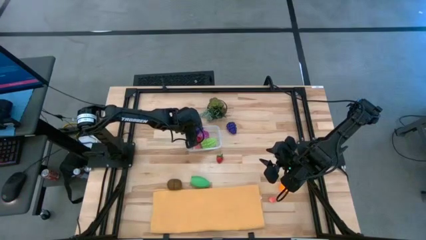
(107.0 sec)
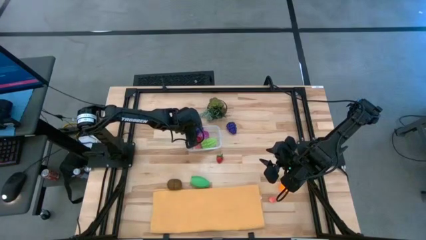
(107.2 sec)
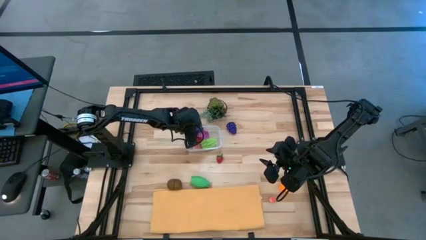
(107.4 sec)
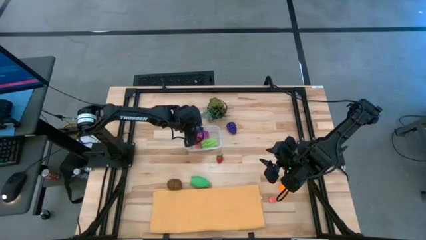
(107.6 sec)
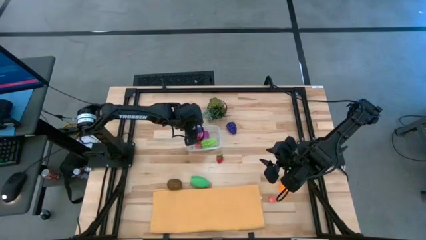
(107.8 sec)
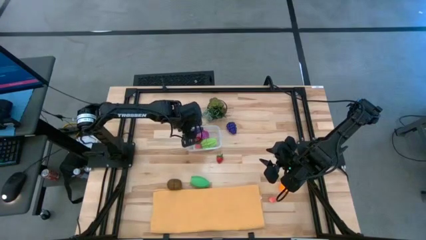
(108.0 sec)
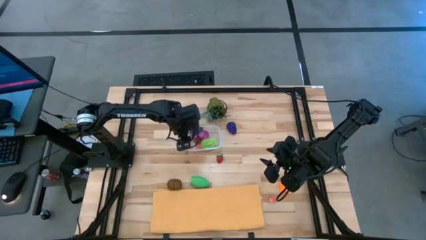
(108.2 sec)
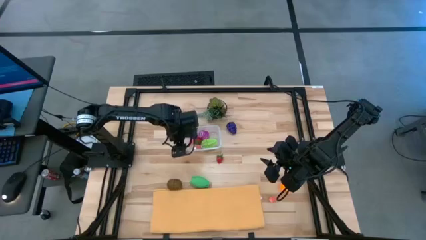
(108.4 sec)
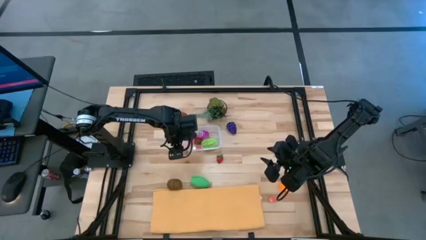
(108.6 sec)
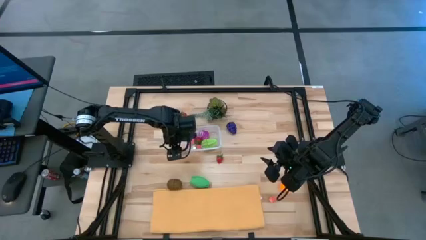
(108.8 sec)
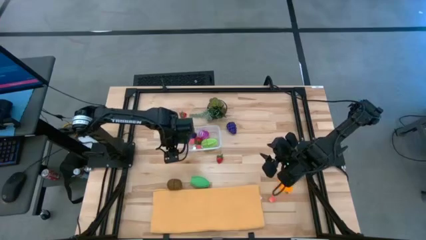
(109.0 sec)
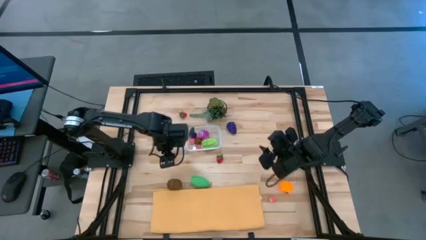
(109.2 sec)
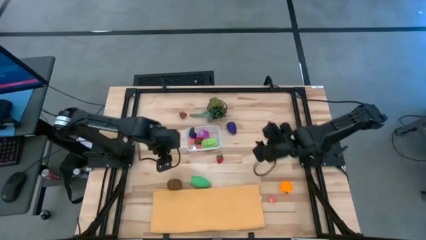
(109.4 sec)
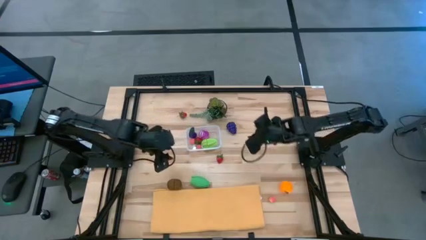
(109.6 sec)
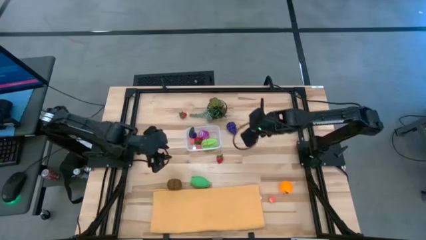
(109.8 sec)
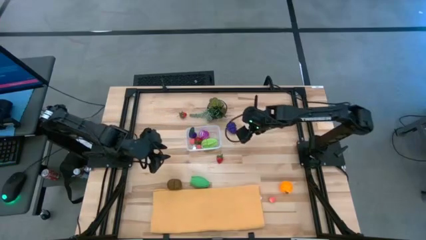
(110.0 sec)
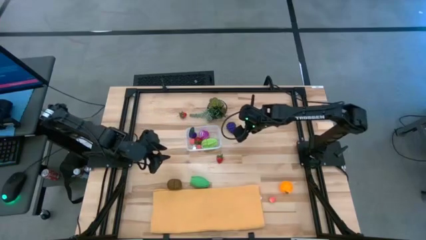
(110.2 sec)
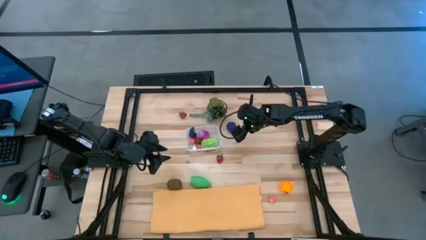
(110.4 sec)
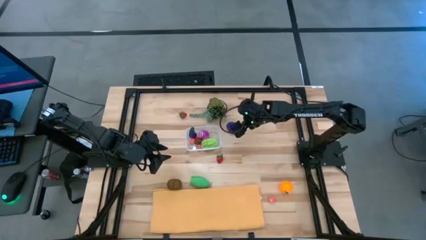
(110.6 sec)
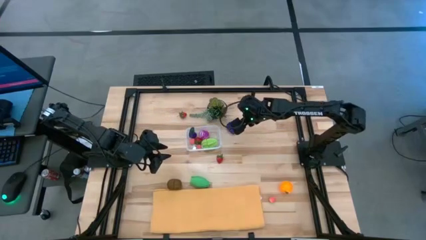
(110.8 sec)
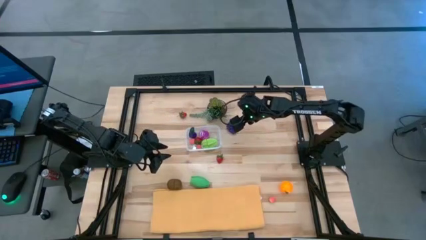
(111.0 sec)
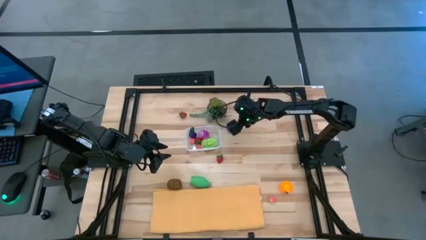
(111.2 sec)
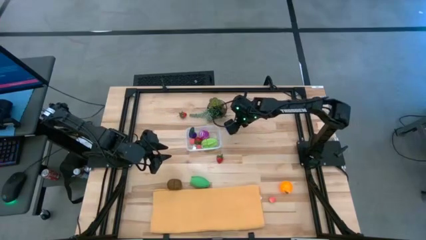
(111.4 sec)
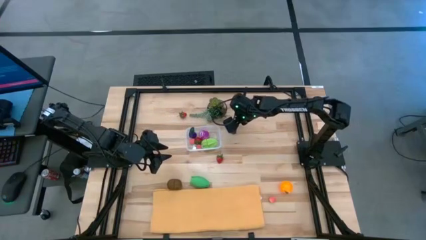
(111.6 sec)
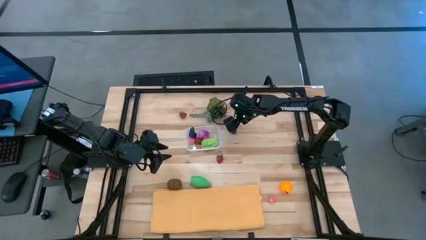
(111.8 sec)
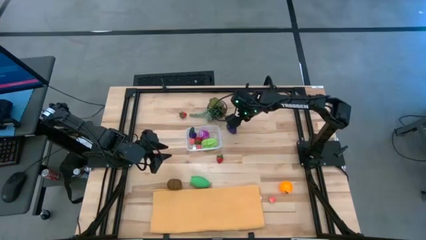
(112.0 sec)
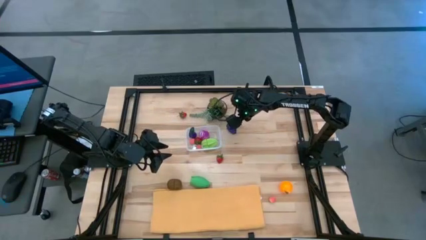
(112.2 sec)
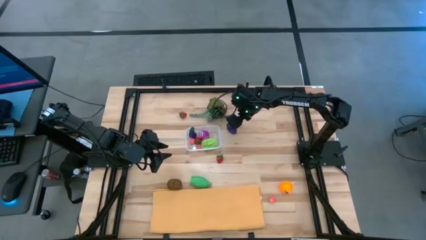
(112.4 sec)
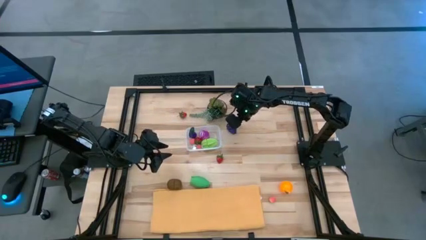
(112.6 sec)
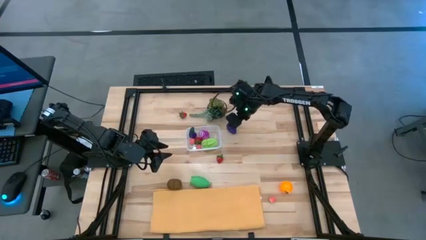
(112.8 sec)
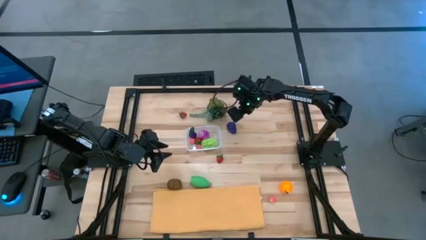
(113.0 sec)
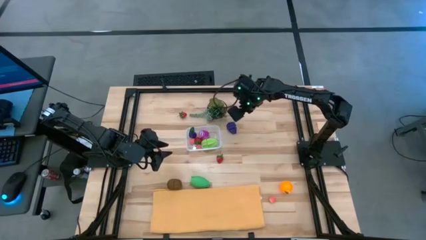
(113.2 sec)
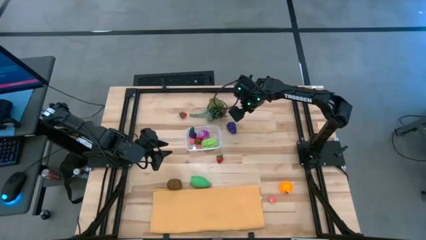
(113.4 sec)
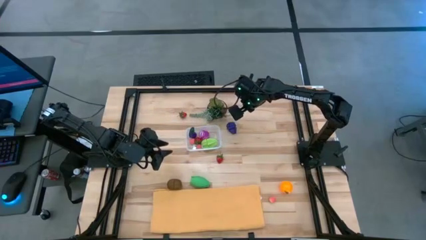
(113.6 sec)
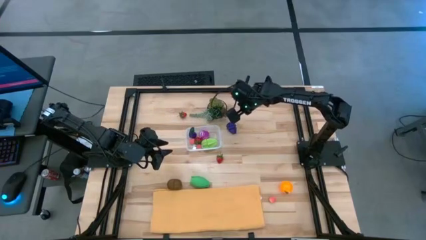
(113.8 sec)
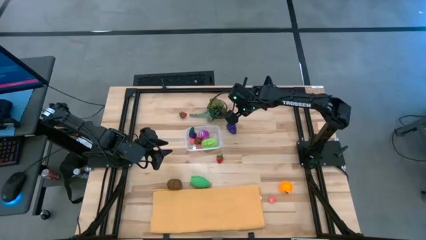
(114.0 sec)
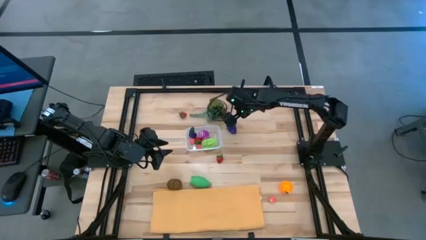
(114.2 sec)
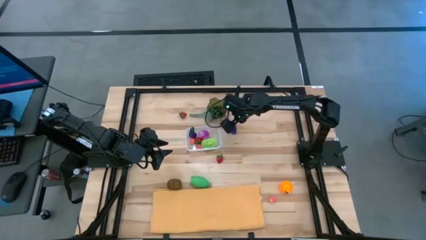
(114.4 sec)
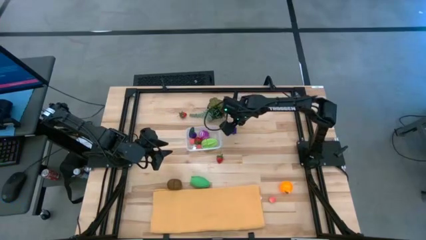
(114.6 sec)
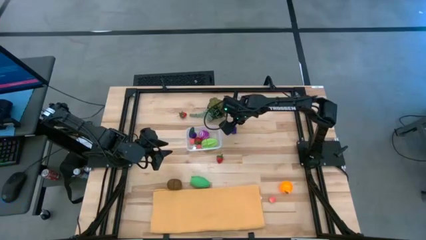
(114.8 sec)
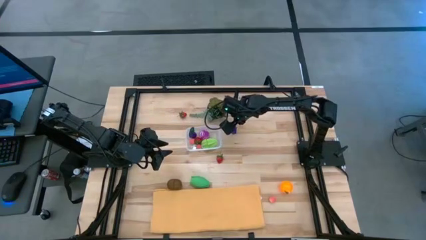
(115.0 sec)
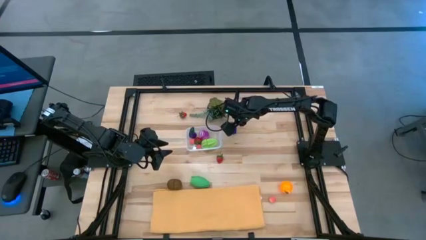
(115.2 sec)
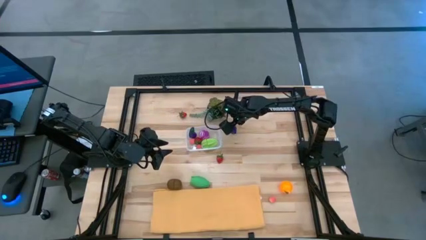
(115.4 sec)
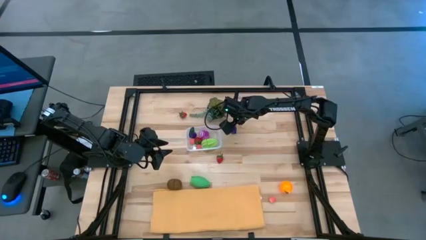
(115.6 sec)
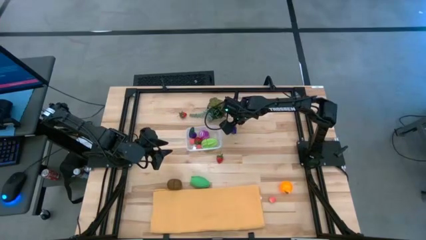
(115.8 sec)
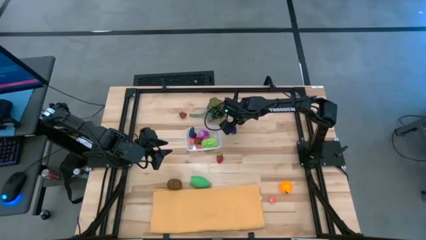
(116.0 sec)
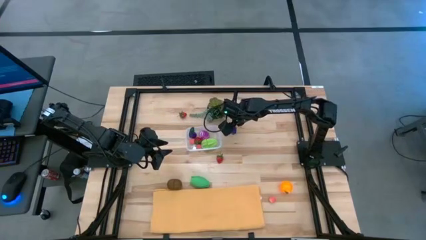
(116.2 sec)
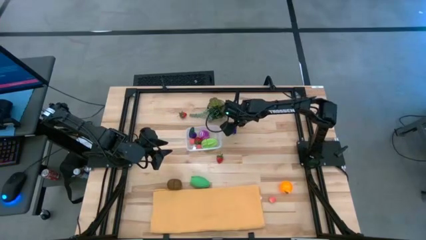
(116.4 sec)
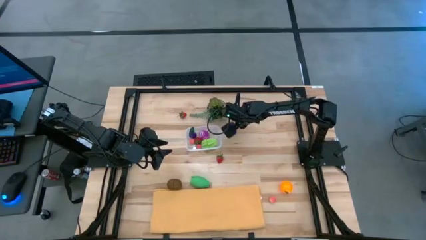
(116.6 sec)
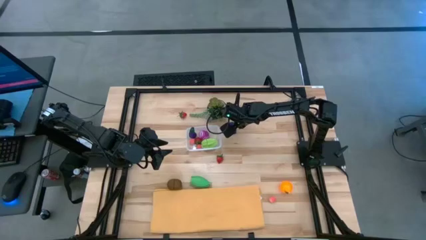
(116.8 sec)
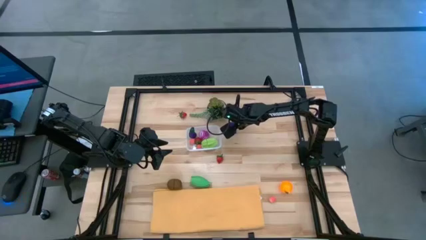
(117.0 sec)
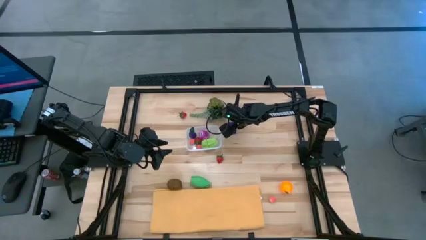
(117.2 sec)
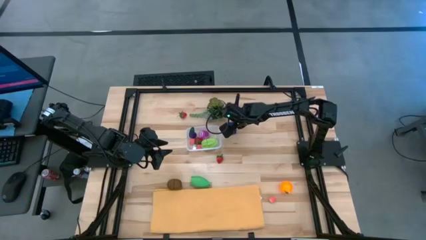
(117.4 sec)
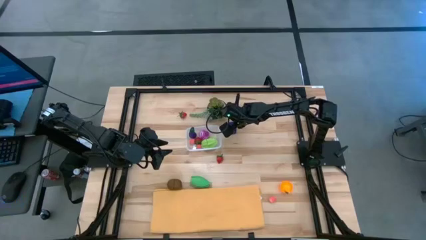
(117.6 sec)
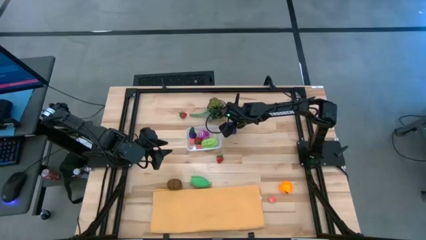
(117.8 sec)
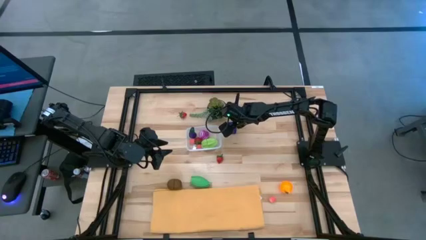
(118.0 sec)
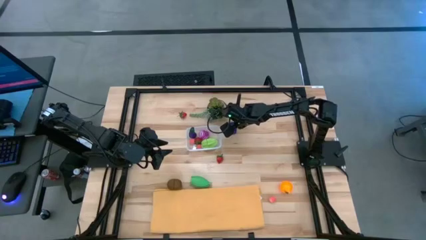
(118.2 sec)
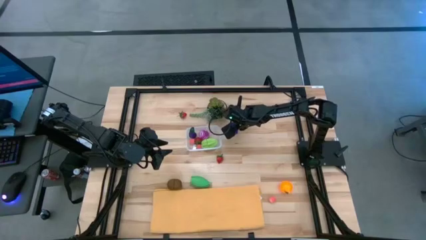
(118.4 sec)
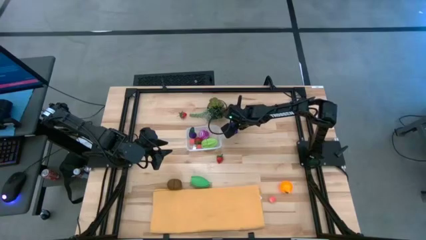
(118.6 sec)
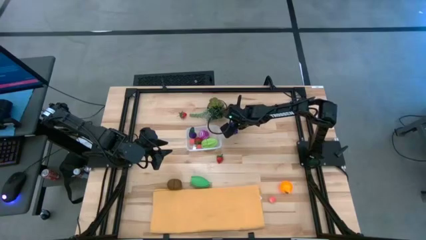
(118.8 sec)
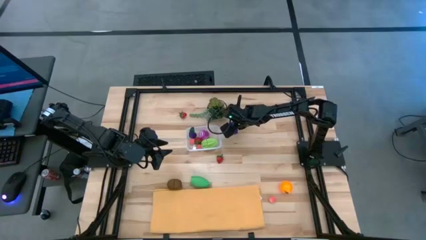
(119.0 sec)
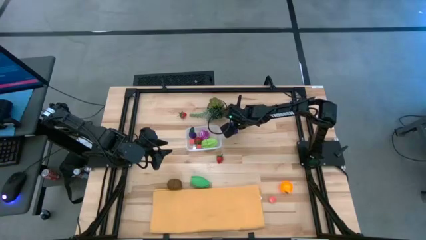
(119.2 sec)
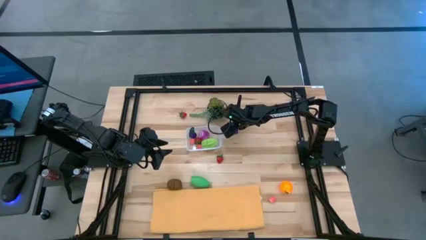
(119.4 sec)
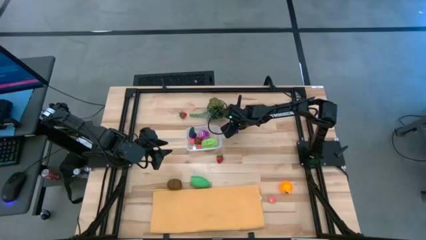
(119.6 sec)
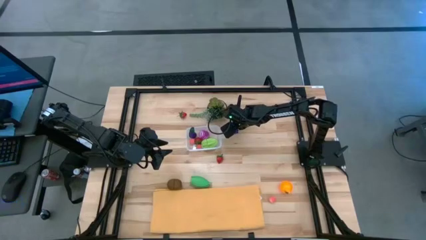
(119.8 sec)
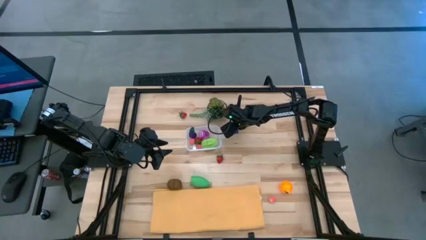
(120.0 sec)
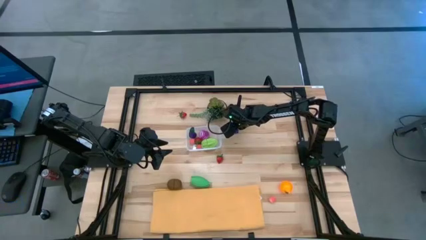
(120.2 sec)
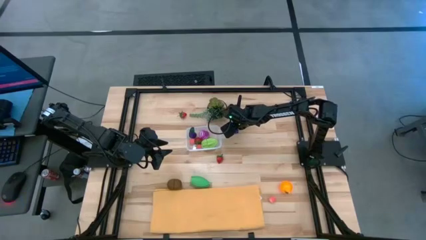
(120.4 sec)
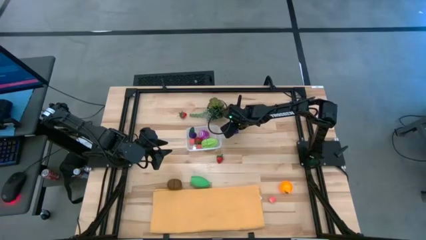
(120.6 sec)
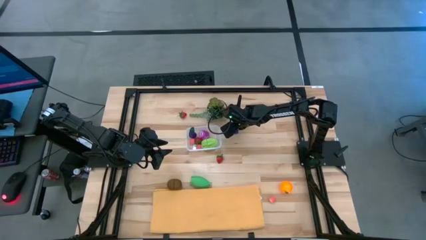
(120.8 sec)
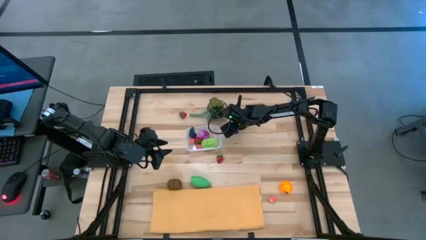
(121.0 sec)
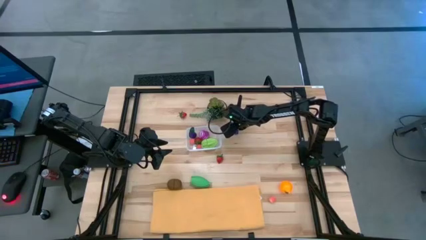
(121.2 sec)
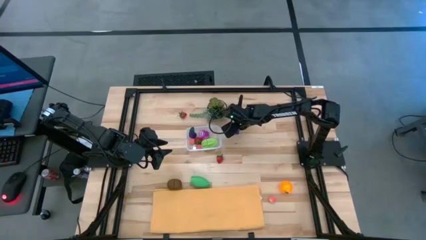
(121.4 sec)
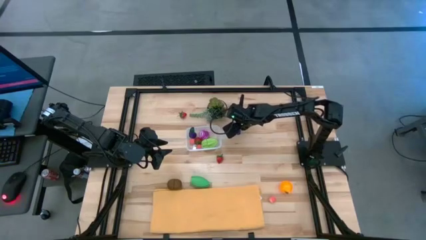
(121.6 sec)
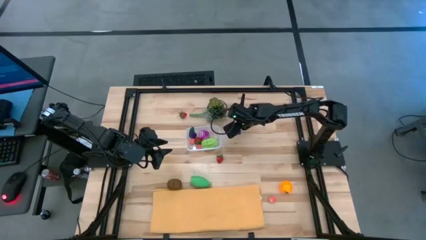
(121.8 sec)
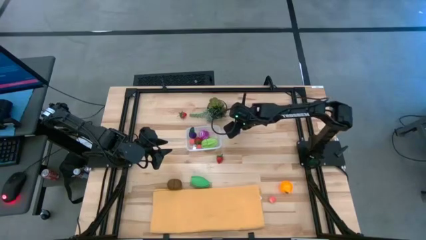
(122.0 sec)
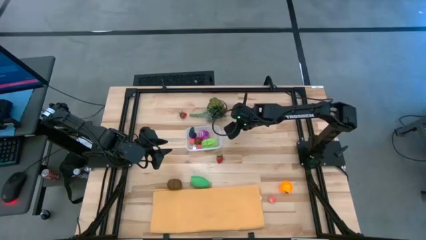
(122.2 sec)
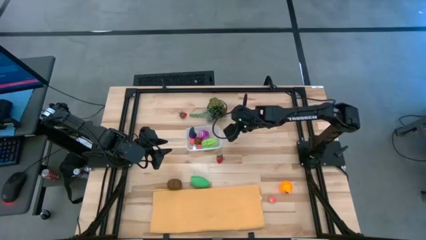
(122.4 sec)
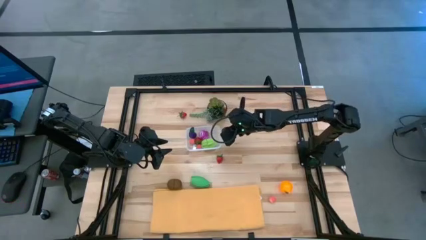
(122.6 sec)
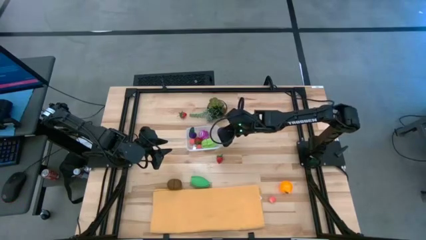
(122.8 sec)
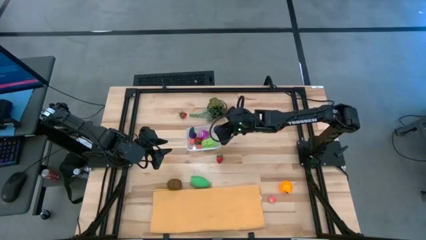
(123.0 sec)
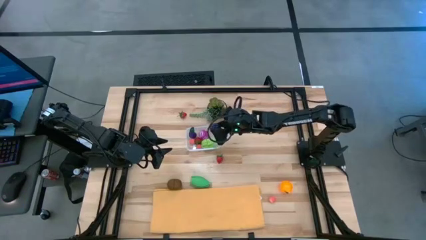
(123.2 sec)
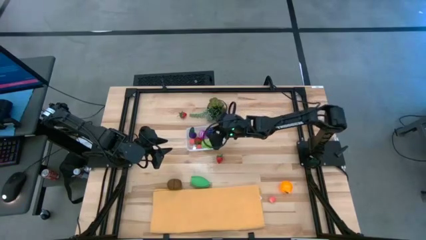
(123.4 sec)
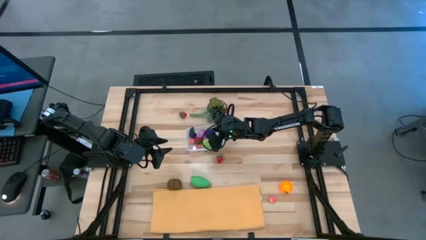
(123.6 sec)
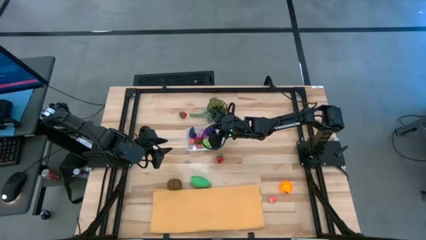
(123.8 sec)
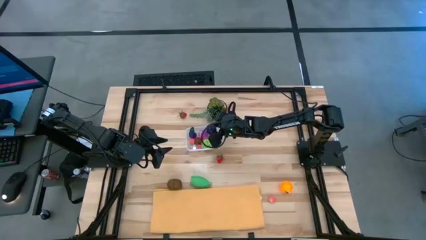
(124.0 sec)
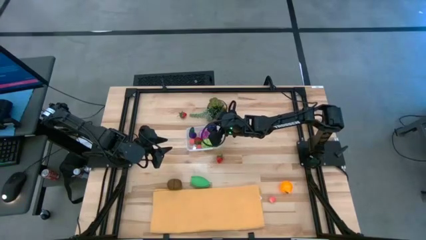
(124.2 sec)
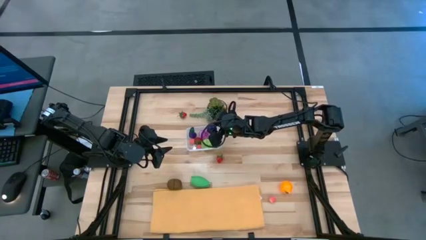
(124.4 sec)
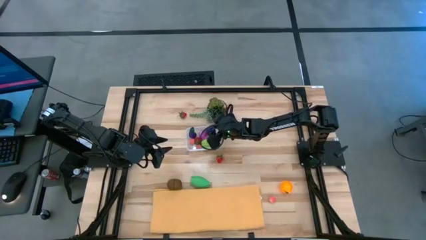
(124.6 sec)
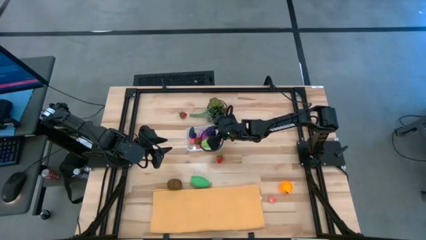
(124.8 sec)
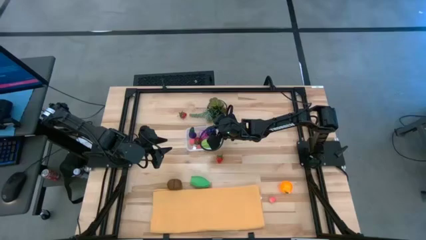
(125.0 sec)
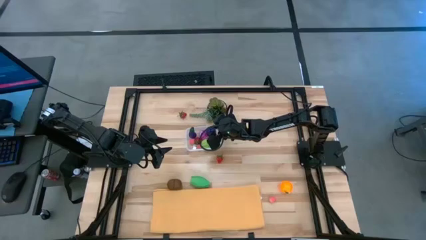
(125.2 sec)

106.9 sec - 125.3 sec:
Task: Pick and placing Produce into tupperware
Put the purple grapes into the transparent bin
